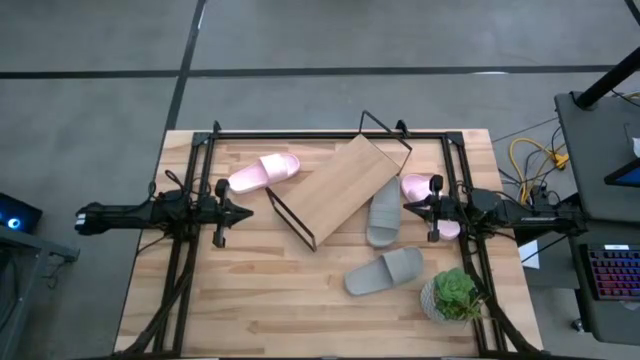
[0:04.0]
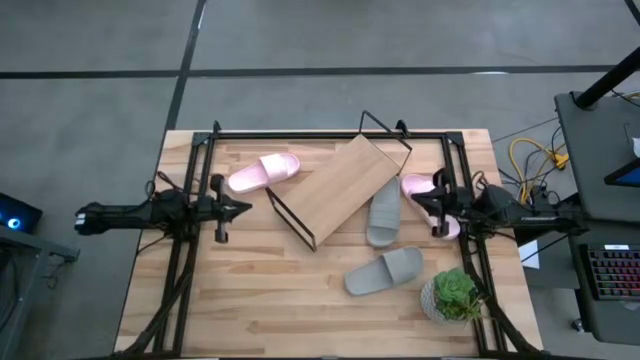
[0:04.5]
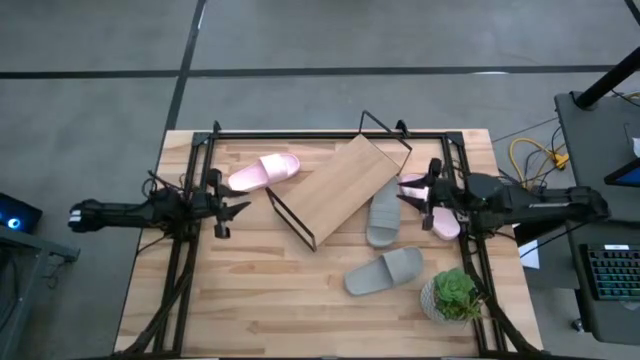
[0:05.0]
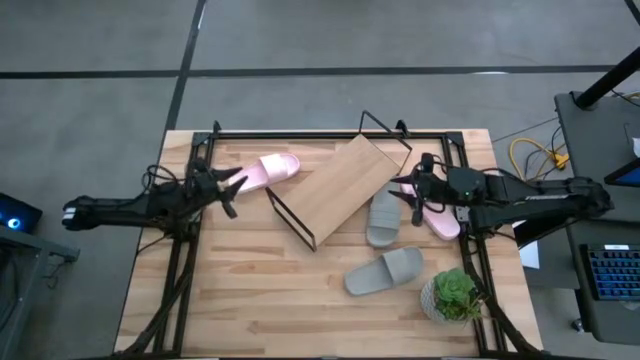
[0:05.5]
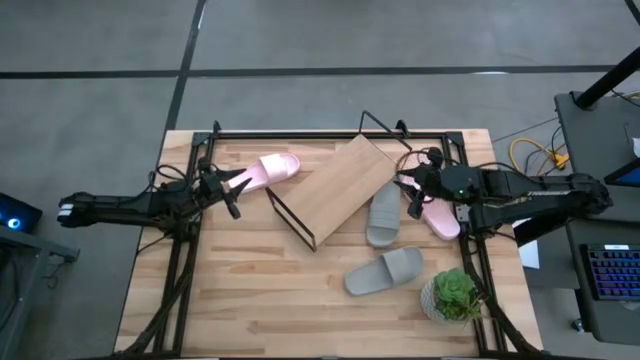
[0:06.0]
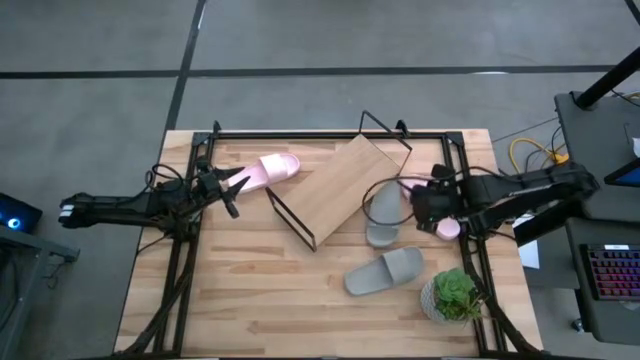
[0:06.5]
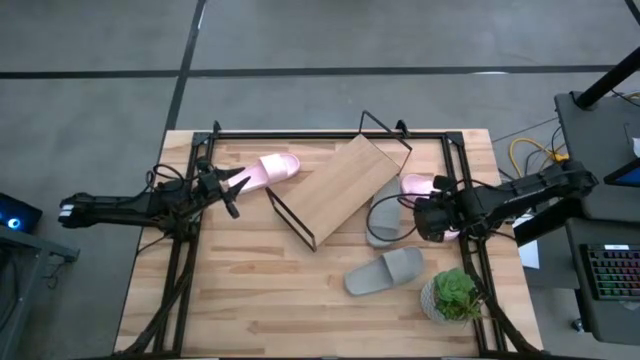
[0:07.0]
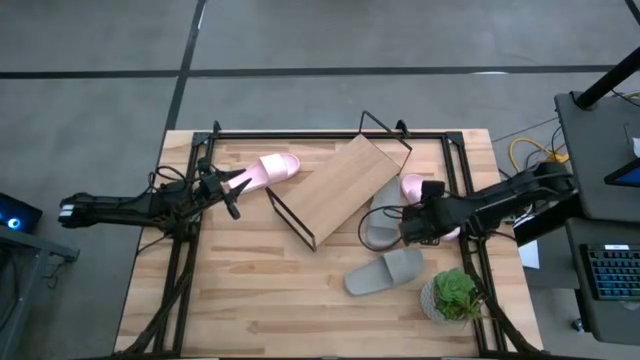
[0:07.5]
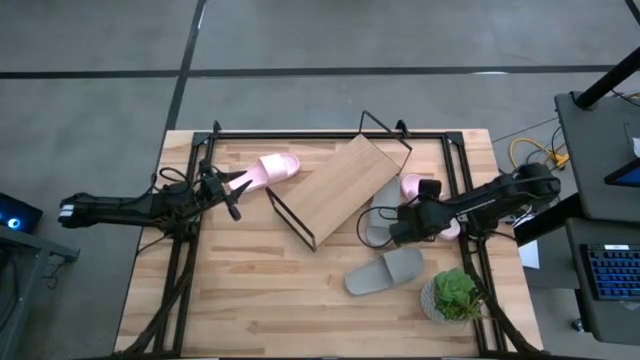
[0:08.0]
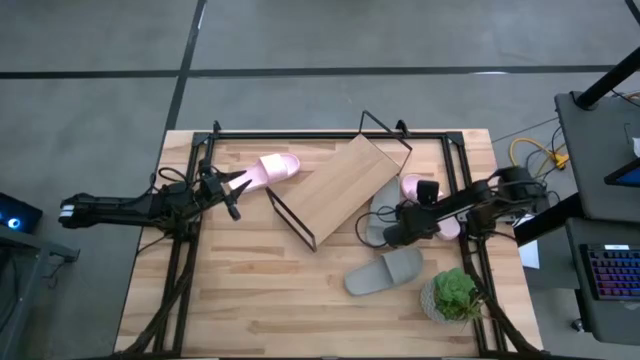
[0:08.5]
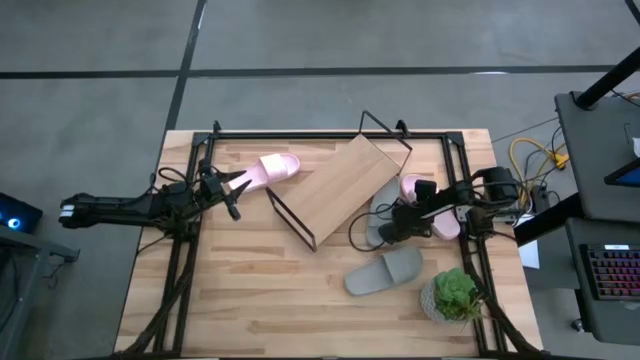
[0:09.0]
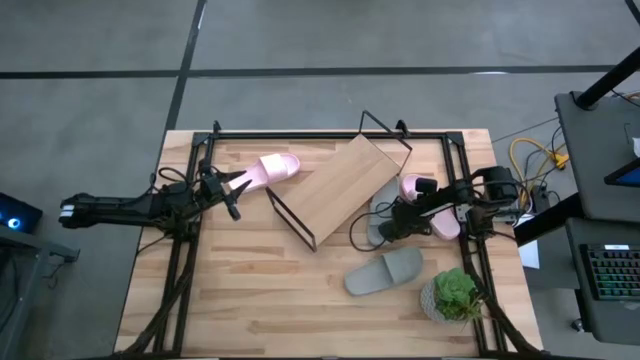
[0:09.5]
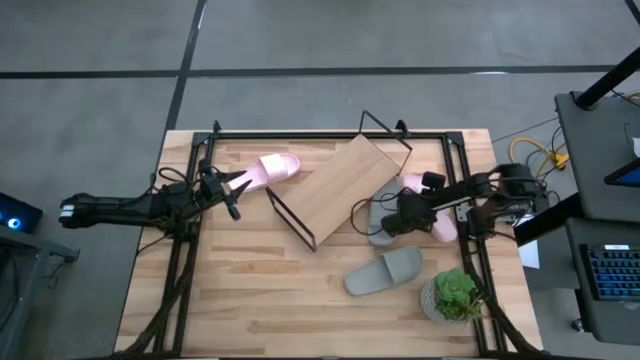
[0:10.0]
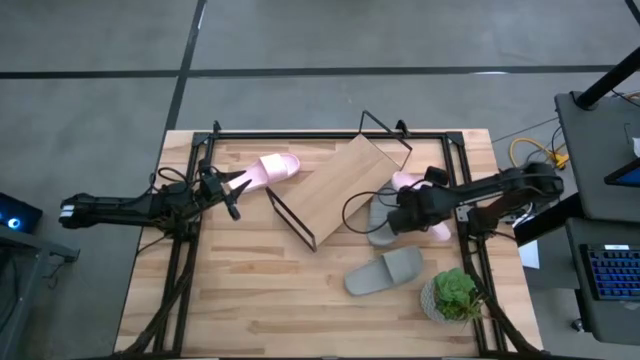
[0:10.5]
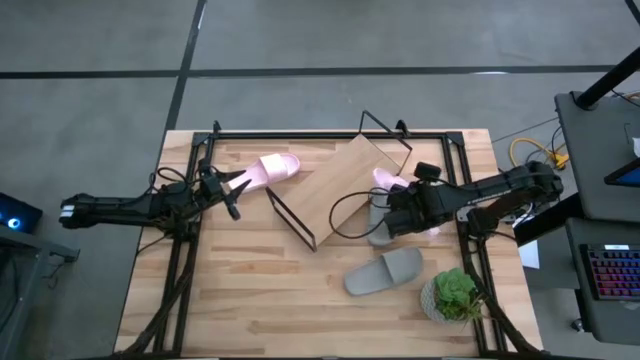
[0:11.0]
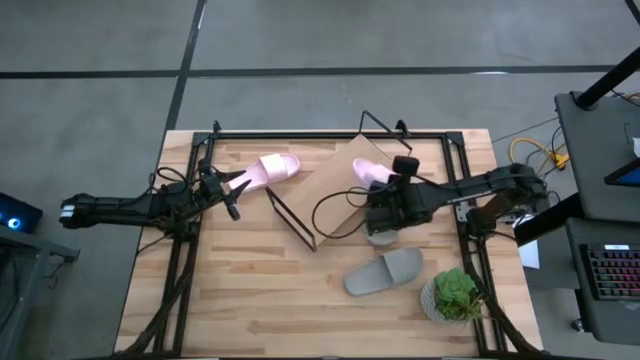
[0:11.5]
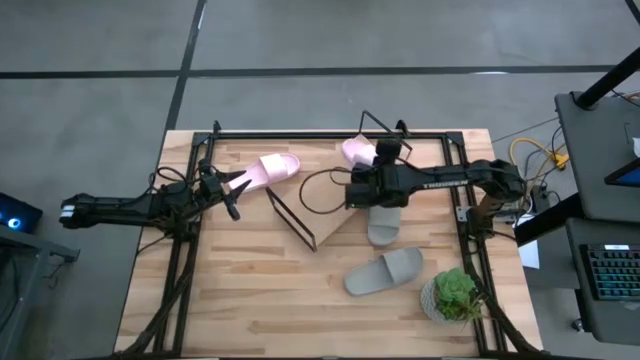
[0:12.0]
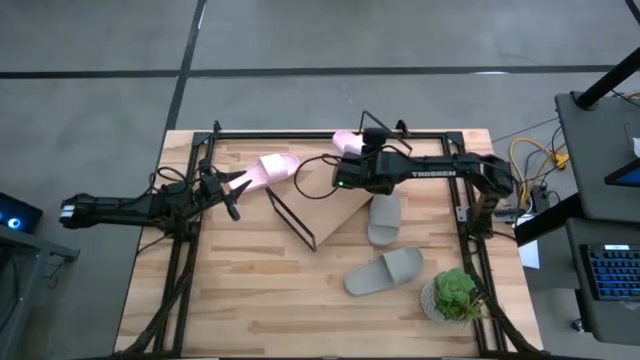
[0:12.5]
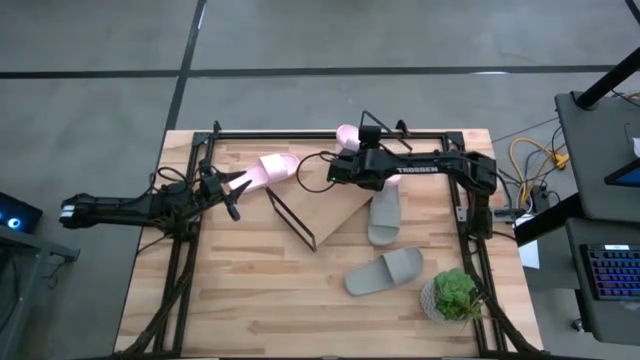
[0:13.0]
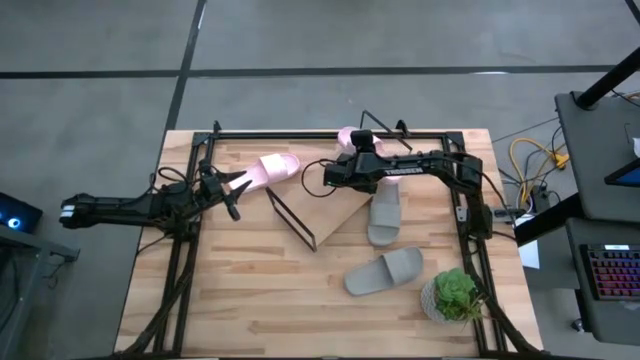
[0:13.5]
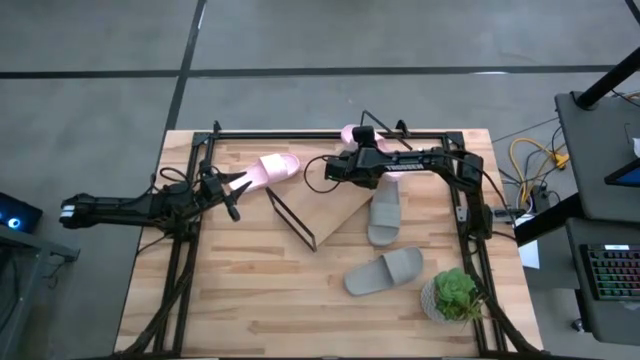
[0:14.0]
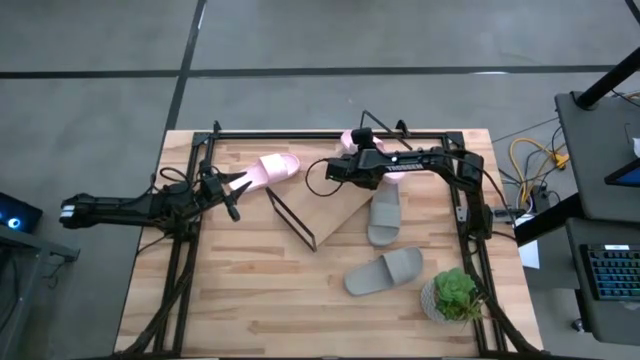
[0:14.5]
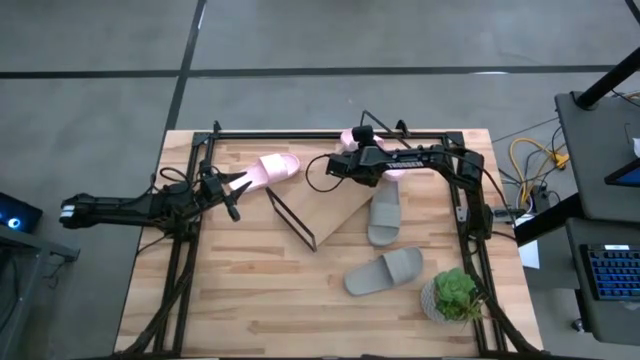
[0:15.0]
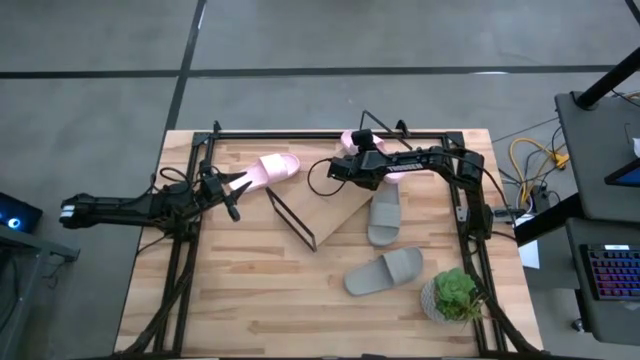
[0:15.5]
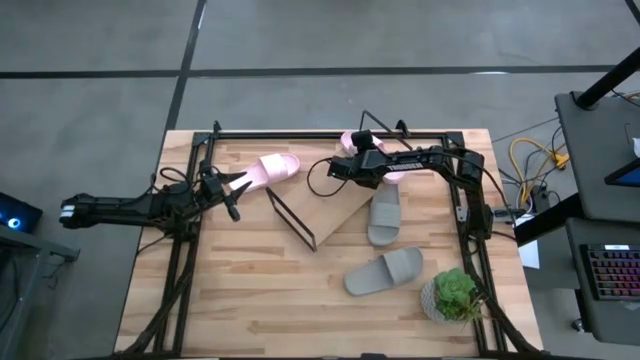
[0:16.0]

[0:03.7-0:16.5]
Task: Pick and place slides into the shelf
Put the right pink slide on the shelf

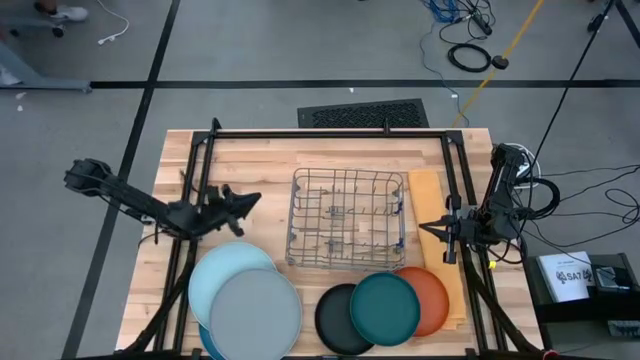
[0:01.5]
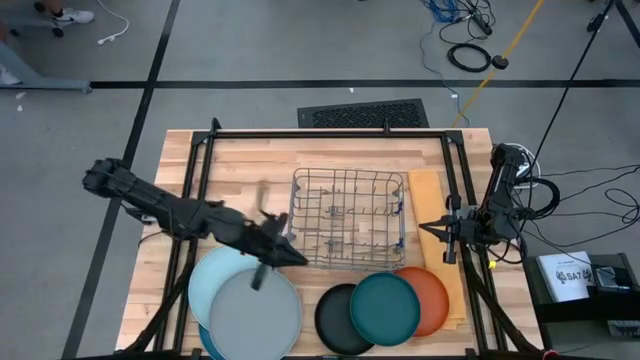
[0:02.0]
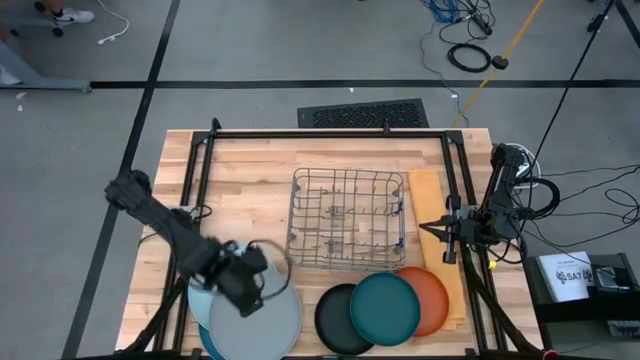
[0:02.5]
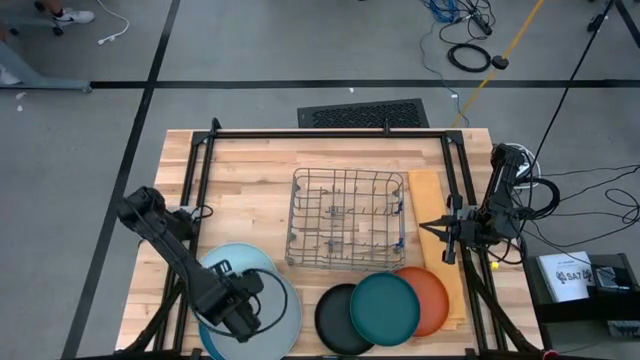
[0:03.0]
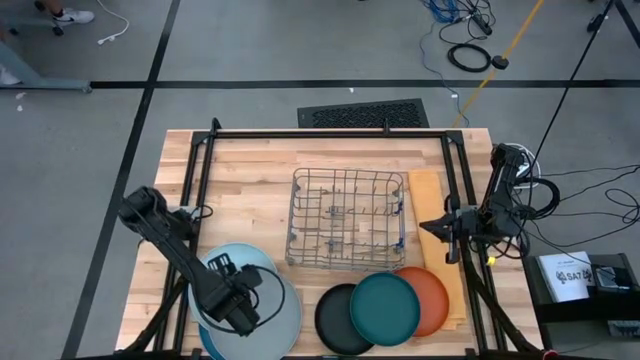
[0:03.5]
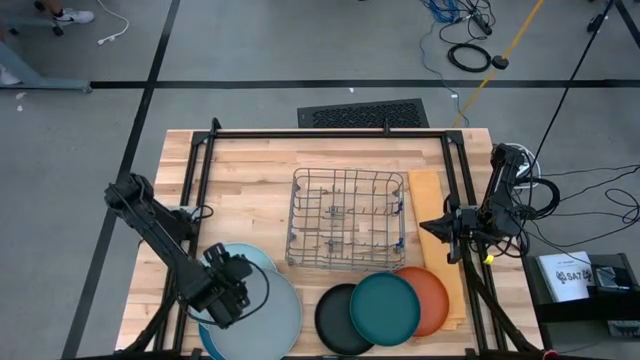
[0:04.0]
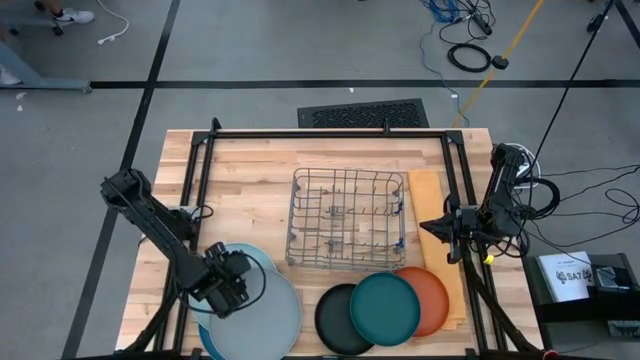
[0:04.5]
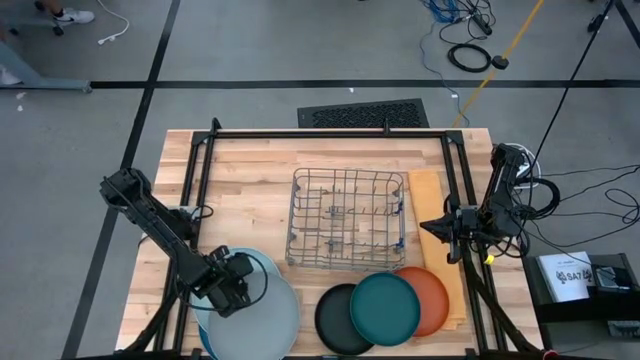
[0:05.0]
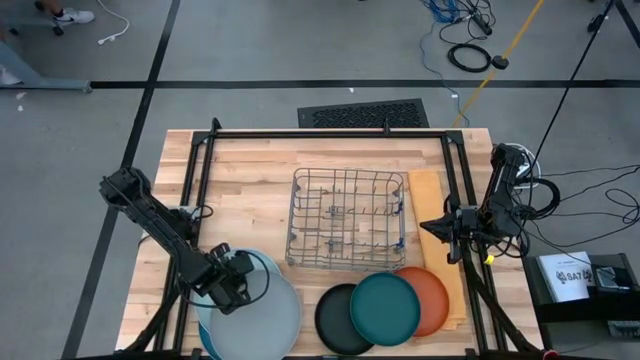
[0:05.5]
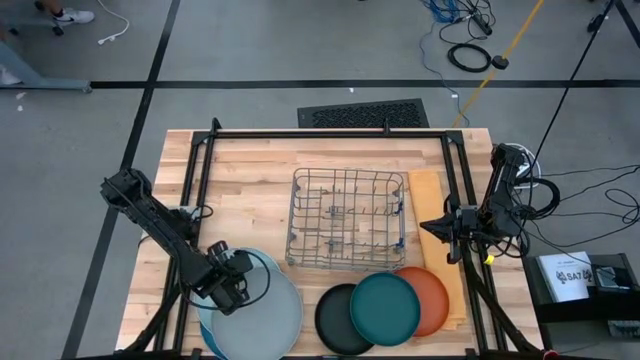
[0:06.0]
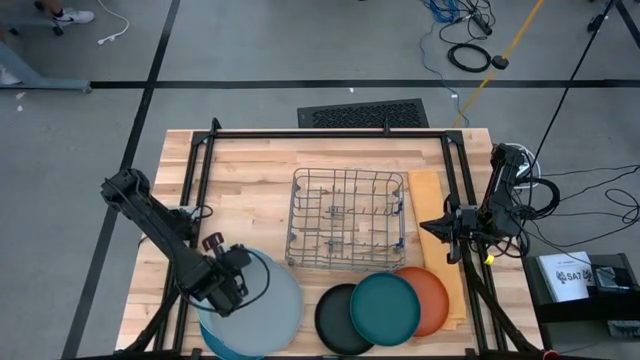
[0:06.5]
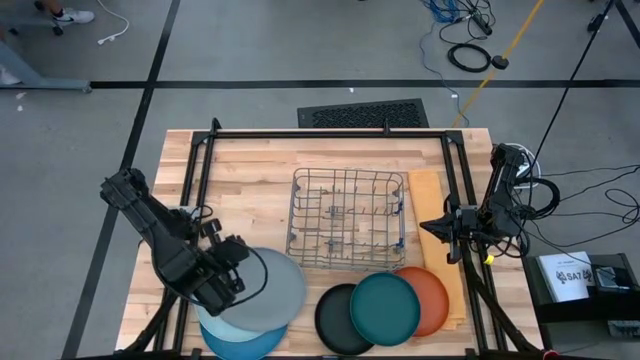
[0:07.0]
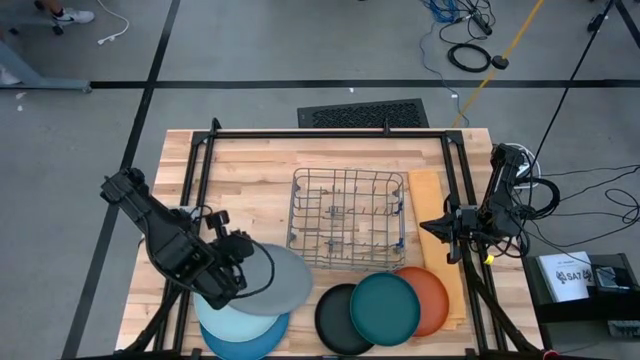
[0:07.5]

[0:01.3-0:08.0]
Task: Sort dishes
Put the gray plate into the dish rack
